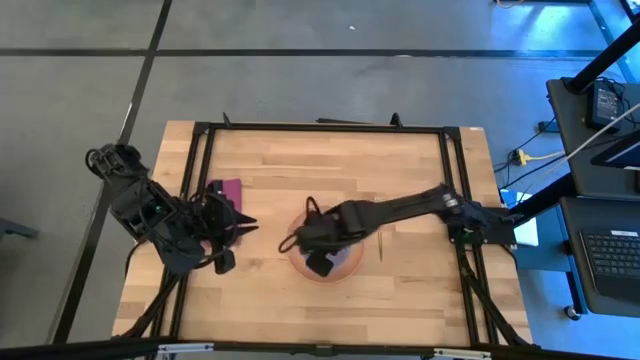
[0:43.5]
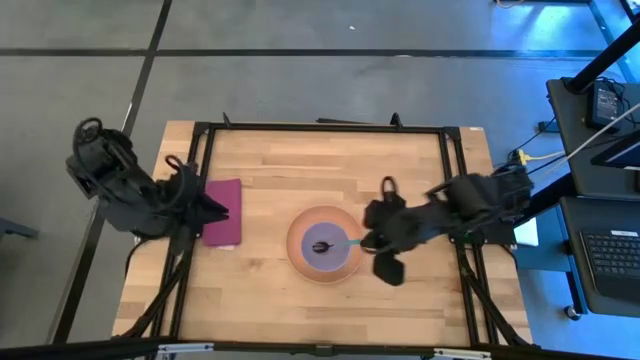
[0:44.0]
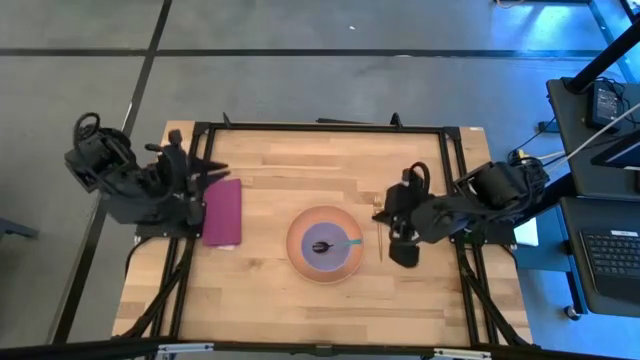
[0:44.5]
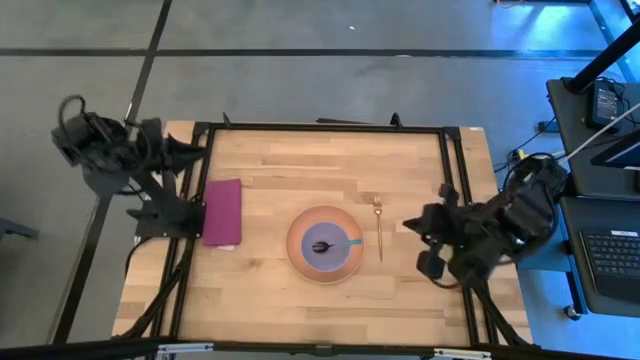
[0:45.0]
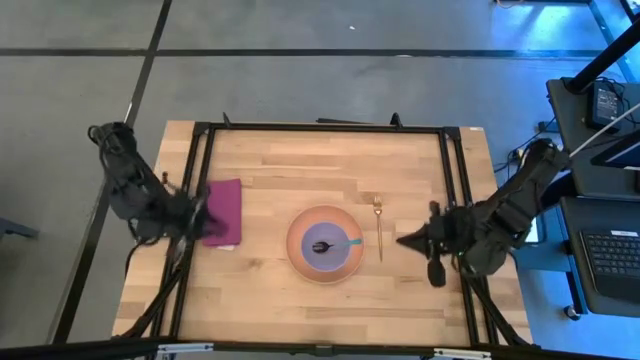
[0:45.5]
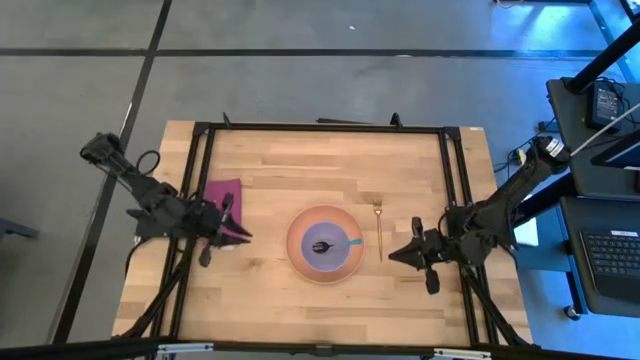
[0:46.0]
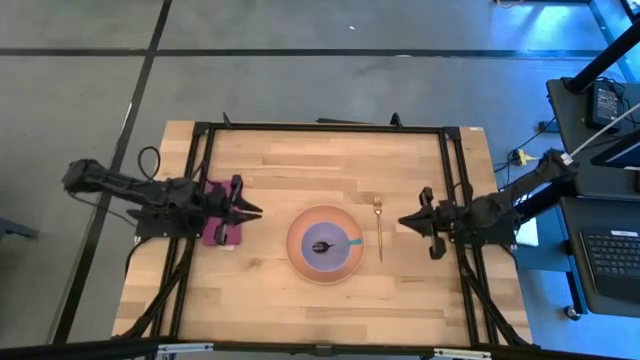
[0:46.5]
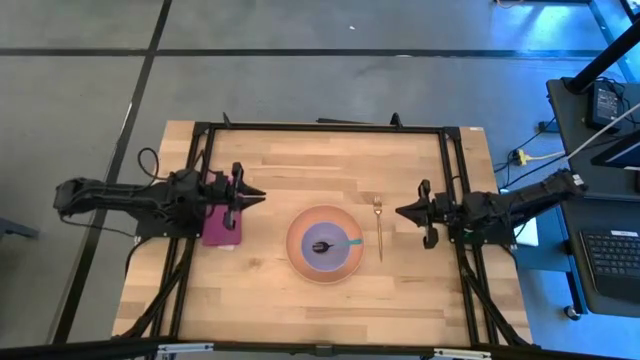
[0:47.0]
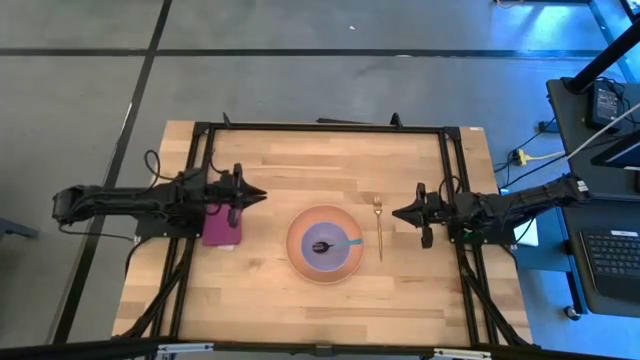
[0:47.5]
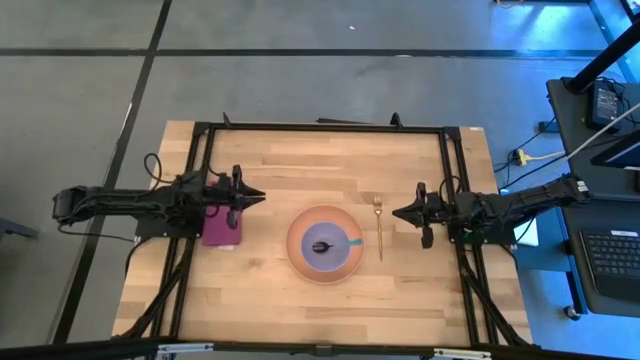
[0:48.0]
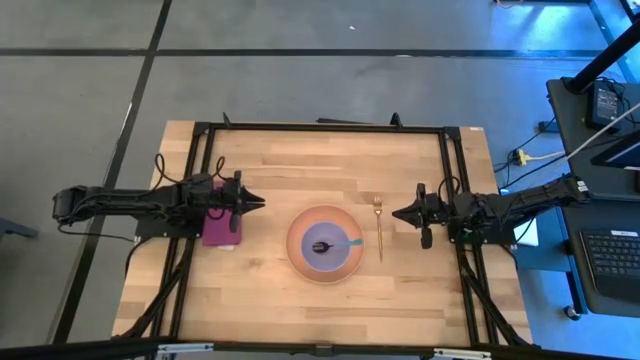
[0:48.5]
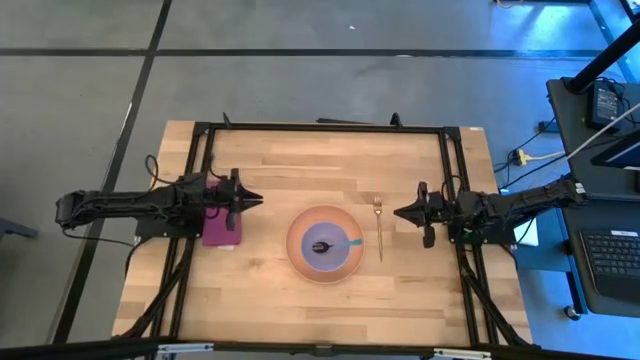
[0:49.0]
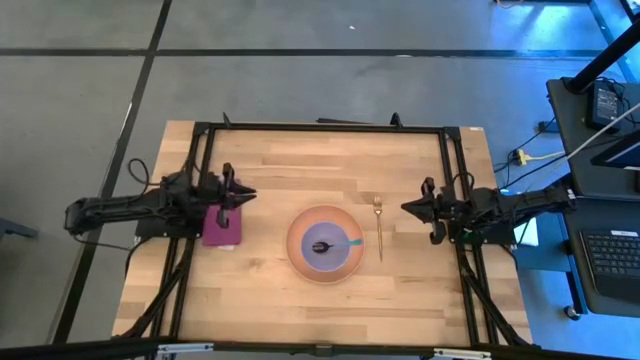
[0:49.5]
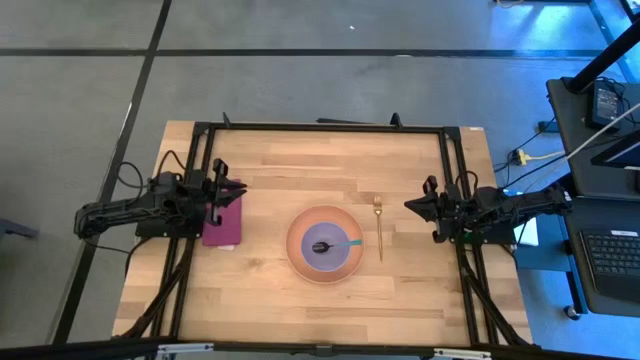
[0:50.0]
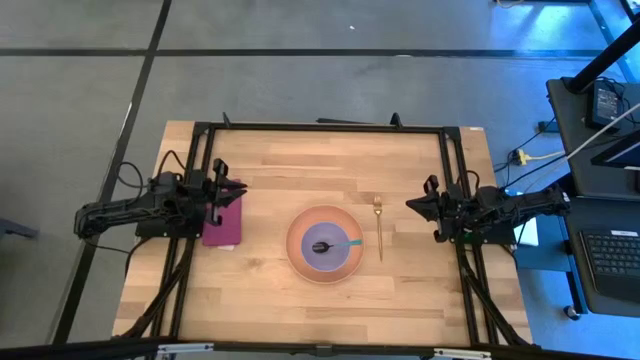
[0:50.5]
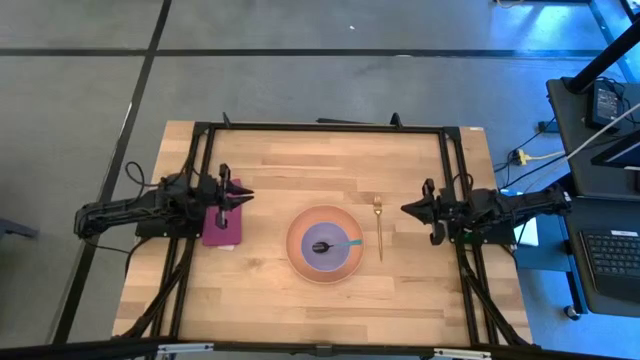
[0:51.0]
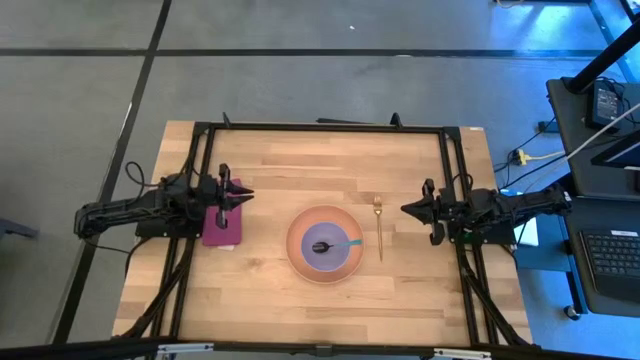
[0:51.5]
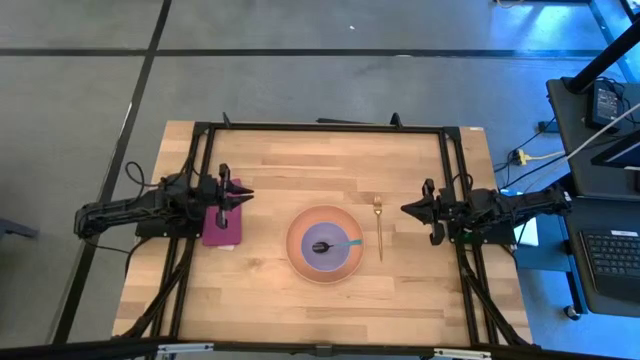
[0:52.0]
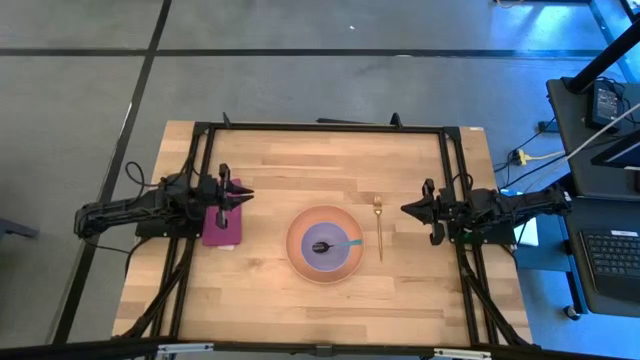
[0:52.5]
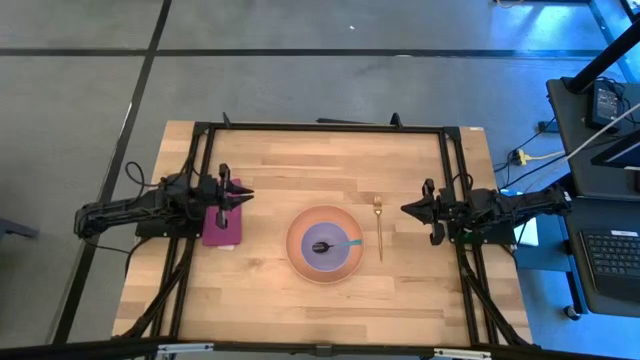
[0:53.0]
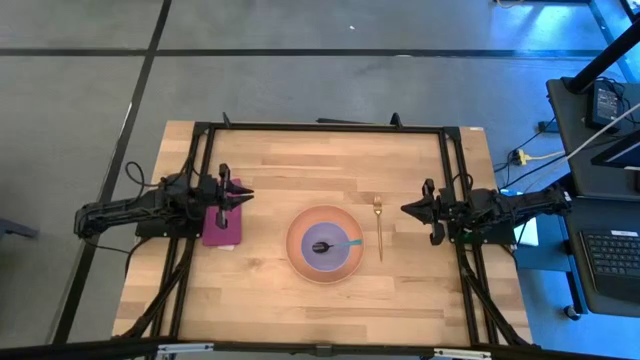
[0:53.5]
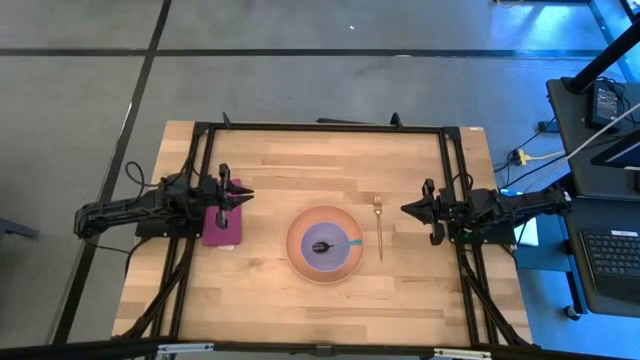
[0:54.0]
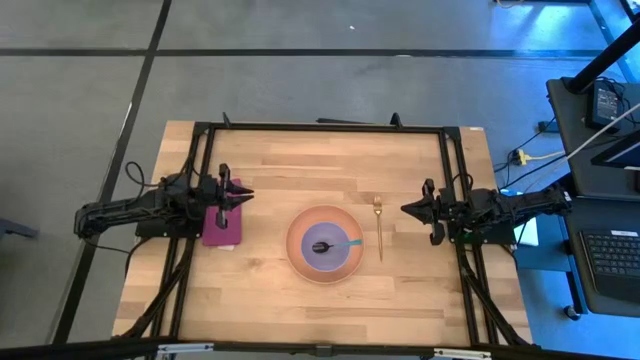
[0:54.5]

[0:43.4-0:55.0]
Task: Set table place
Return to Home Position

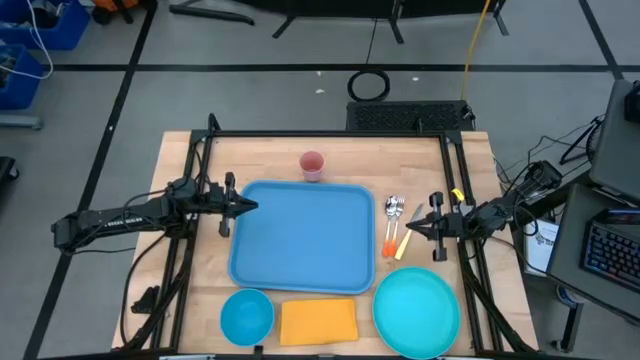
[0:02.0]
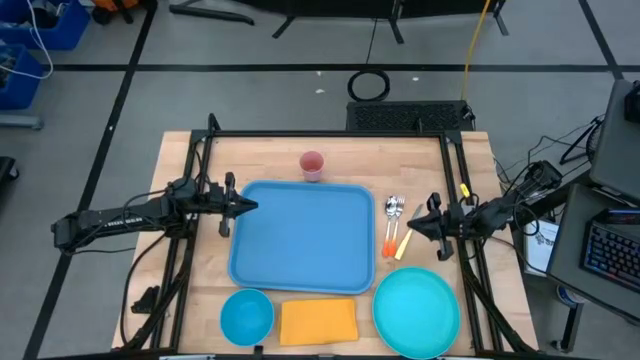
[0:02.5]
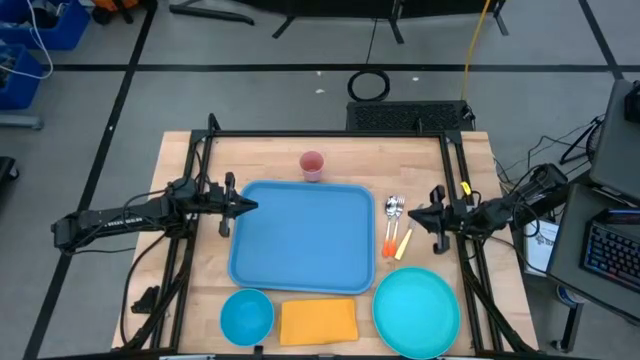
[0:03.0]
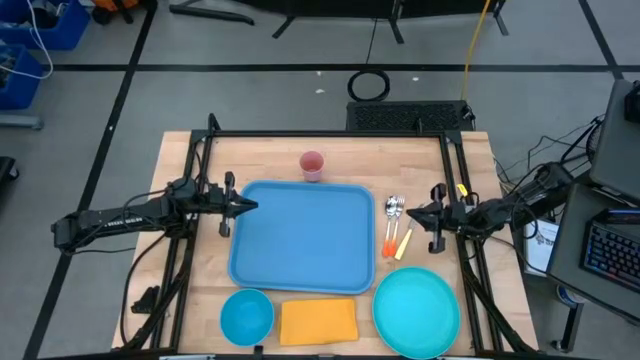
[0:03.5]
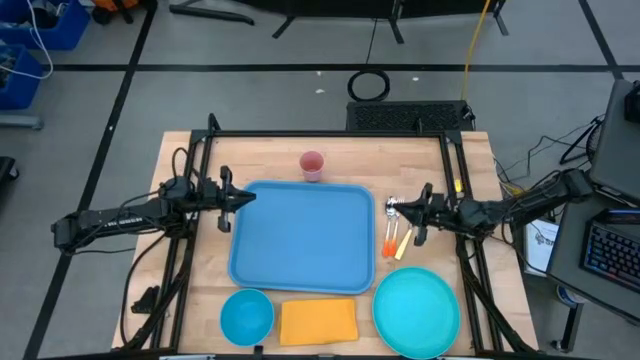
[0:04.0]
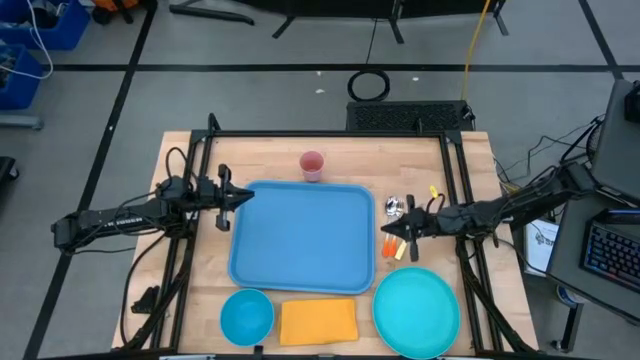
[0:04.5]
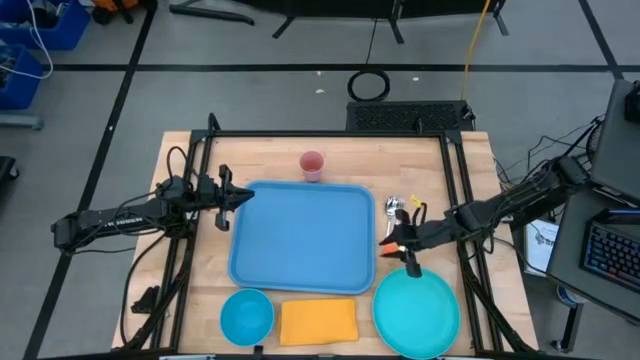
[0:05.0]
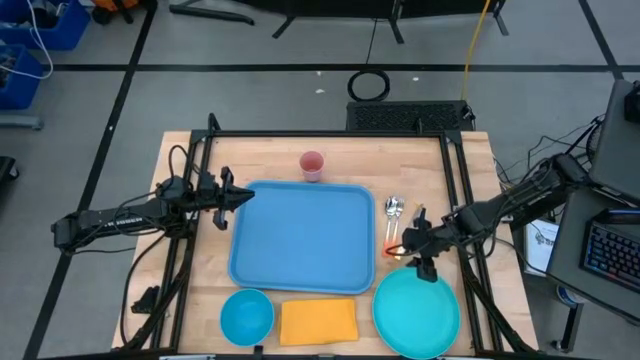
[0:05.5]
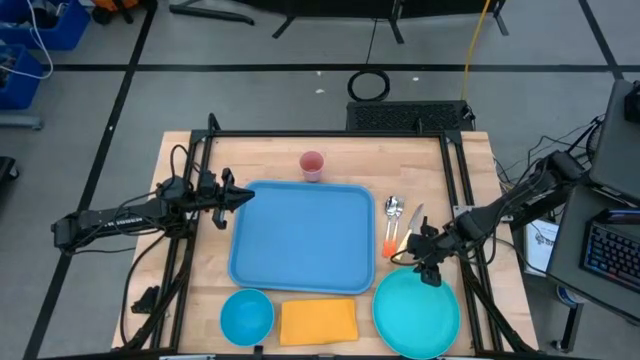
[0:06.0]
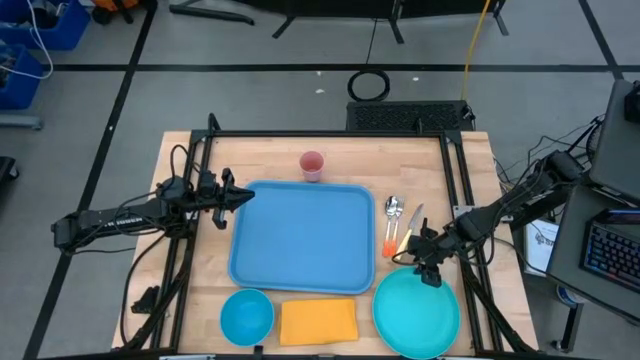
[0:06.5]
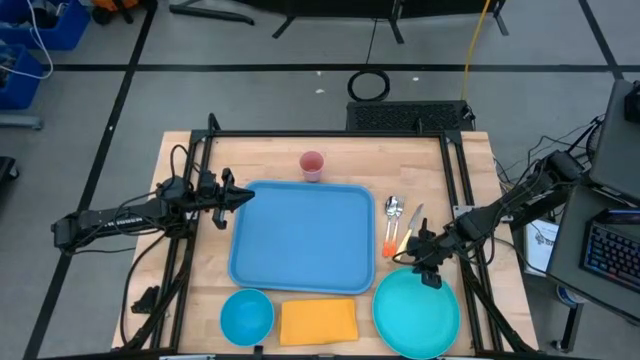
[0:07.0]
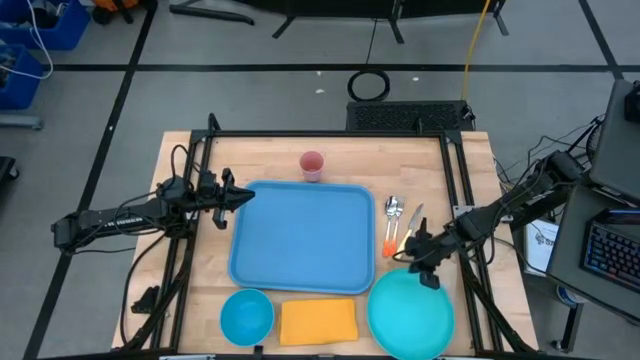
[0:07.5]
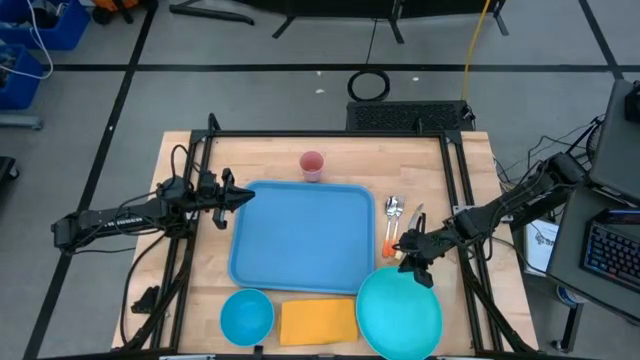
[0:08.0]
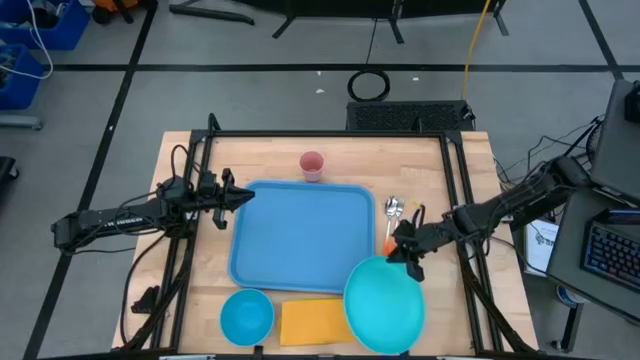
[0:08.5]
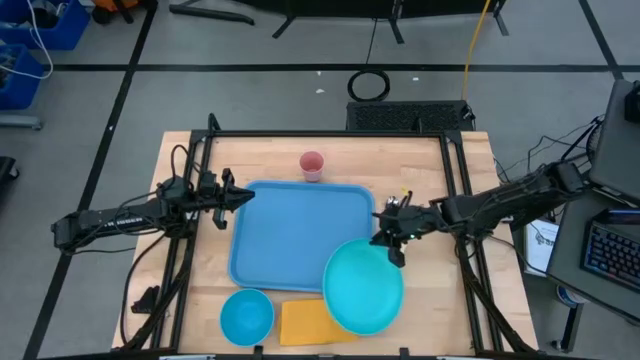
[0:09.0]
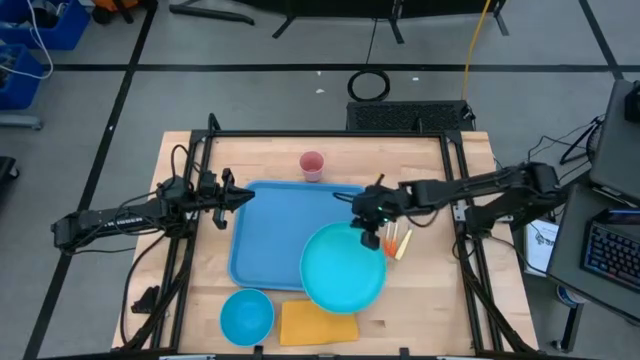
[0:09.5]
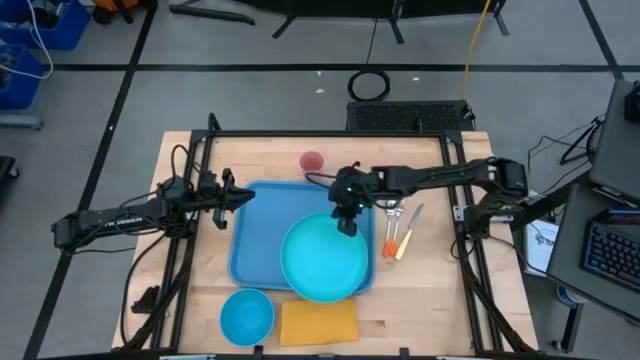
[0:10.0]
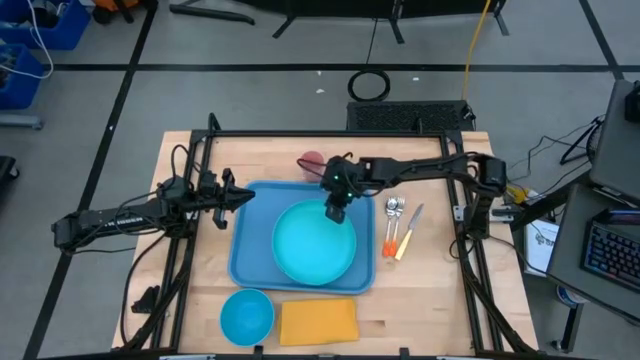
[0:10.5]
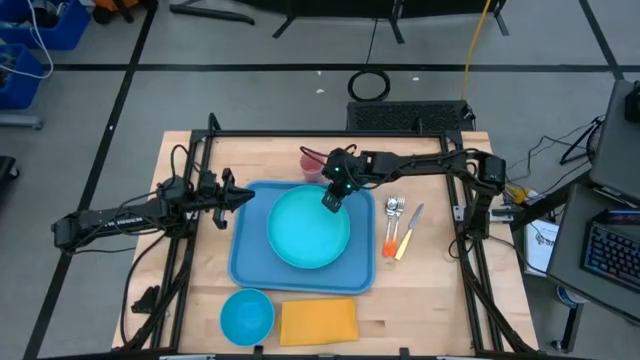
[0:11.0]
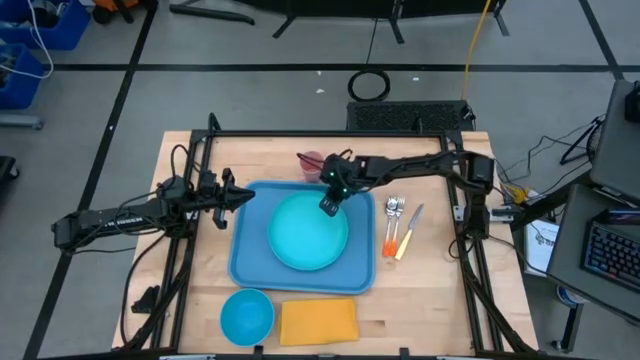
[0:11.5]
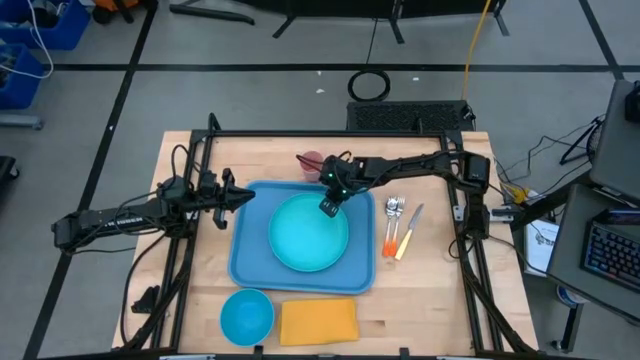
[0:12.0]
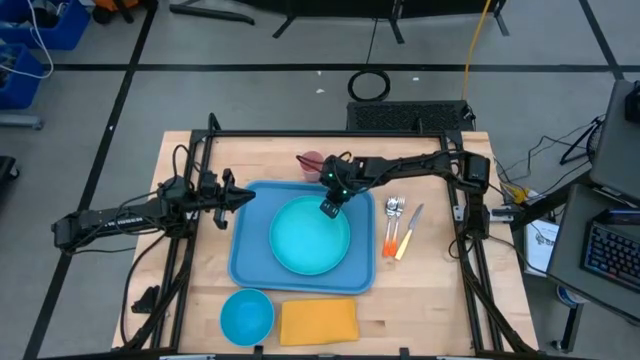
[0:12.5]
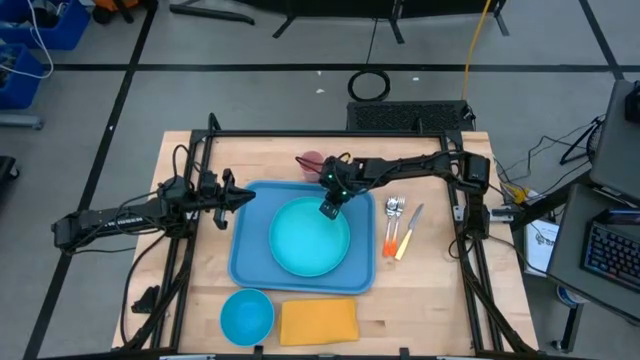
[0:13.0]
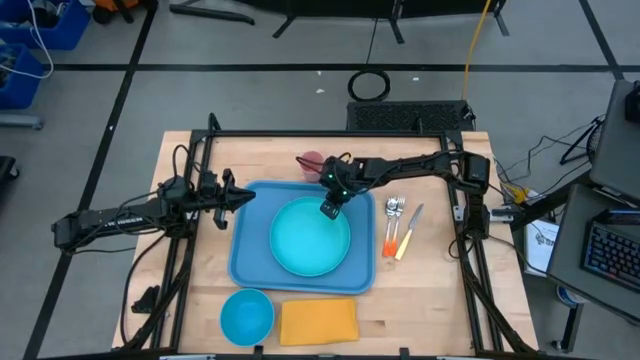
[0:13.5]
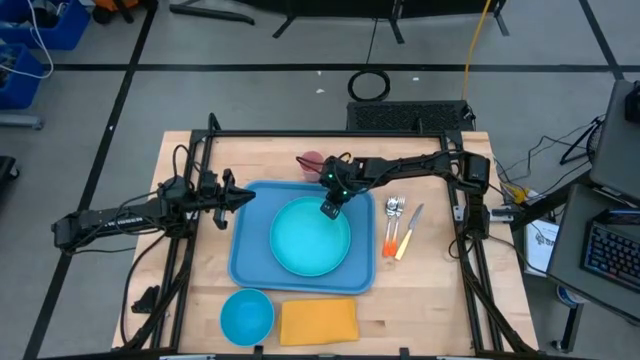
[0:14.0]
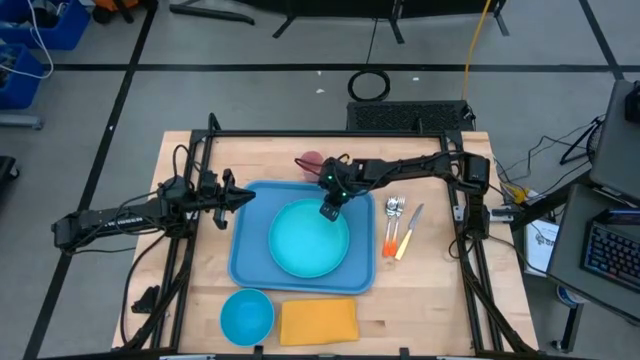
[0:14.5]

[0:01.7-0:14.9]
Task: Set up tray
Put the green plate on the blue serving tray
